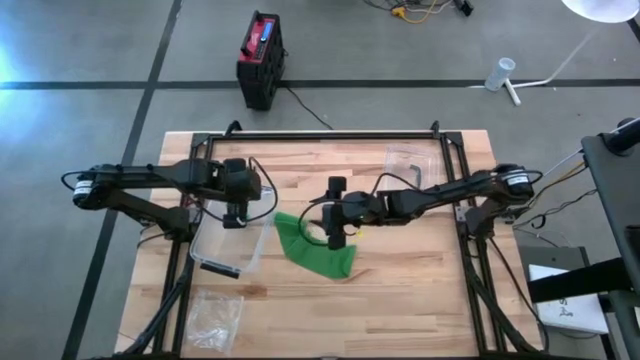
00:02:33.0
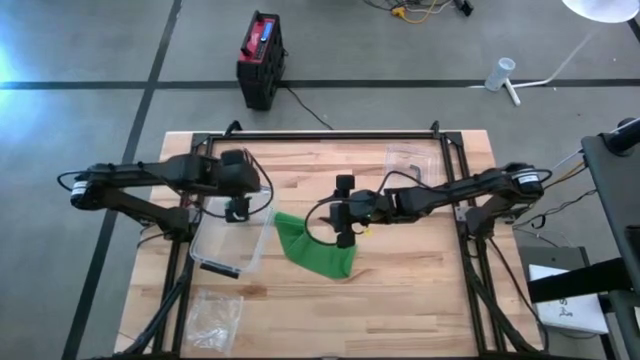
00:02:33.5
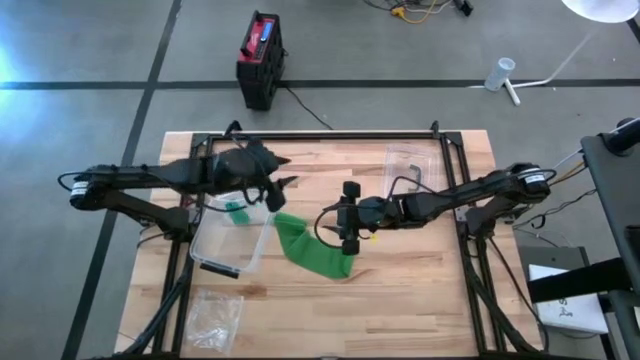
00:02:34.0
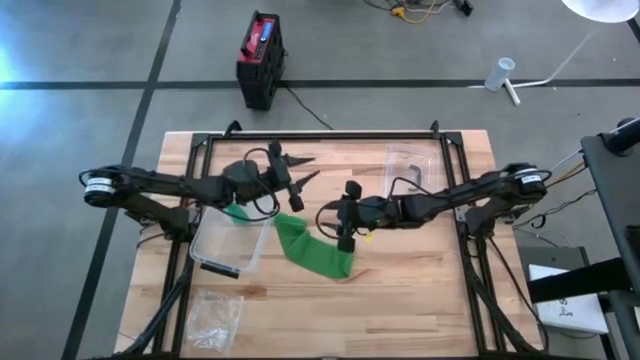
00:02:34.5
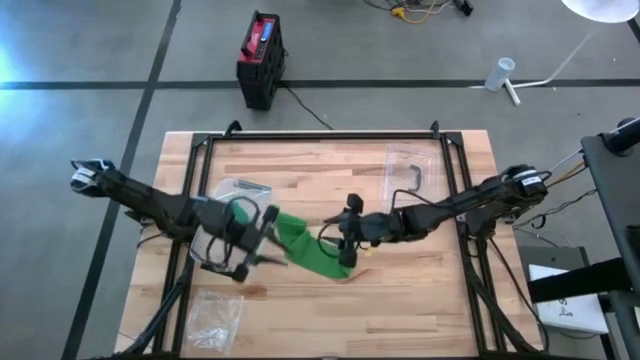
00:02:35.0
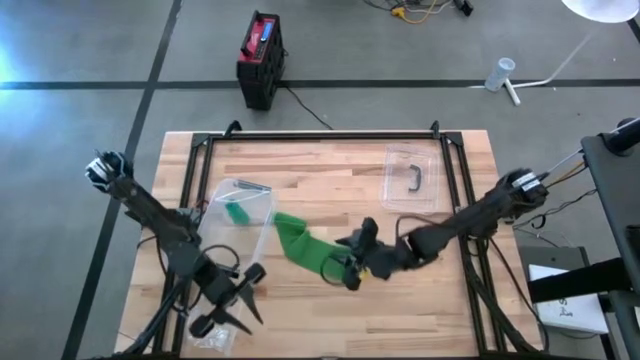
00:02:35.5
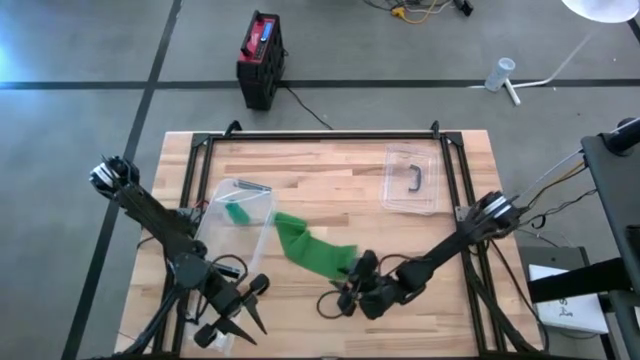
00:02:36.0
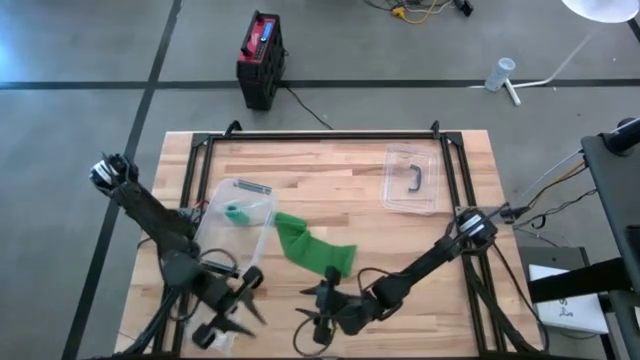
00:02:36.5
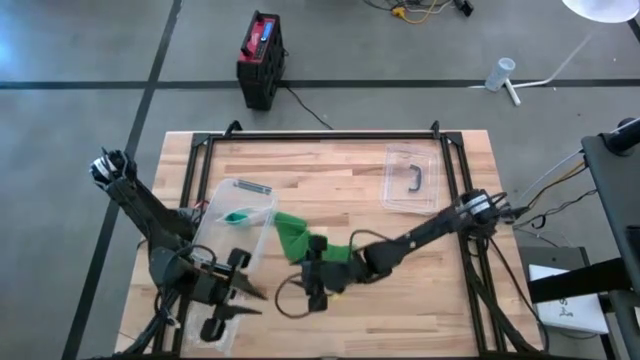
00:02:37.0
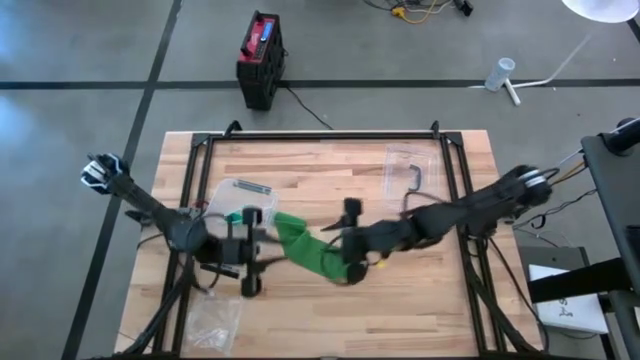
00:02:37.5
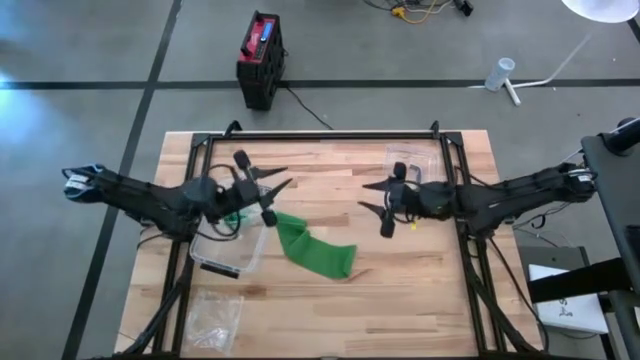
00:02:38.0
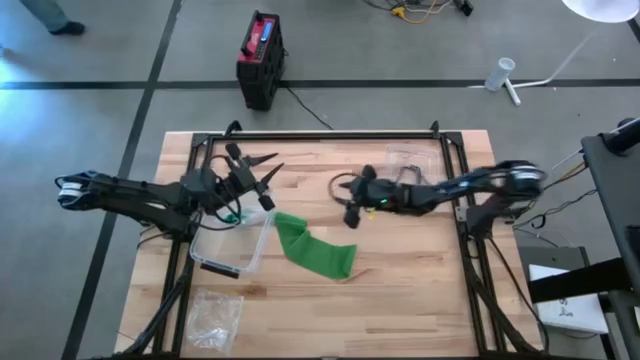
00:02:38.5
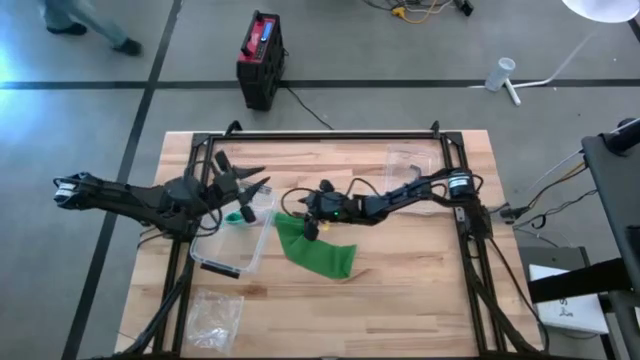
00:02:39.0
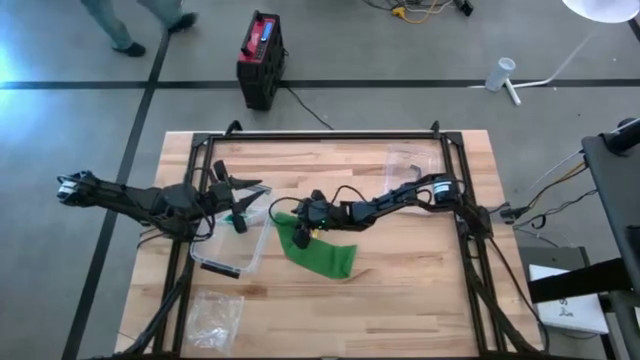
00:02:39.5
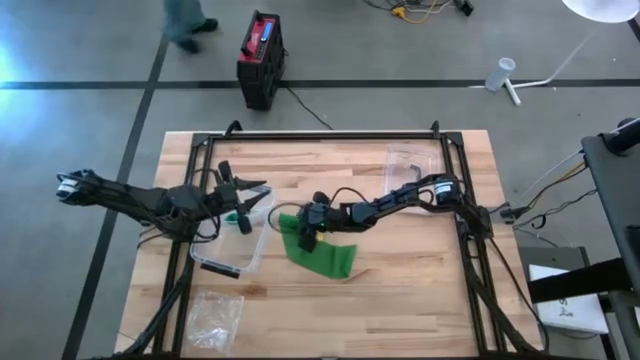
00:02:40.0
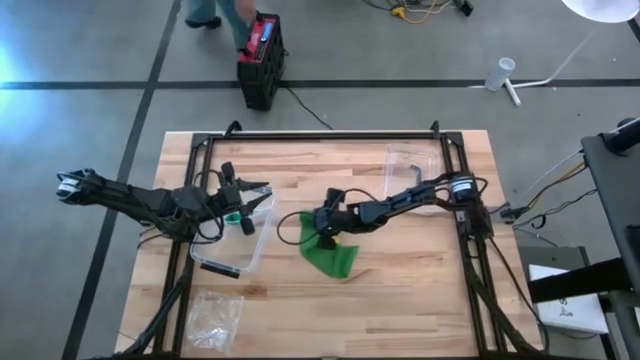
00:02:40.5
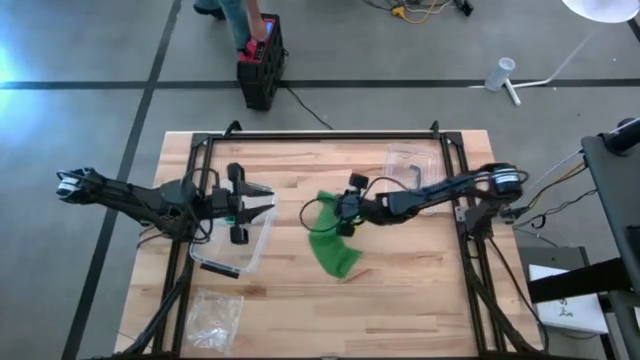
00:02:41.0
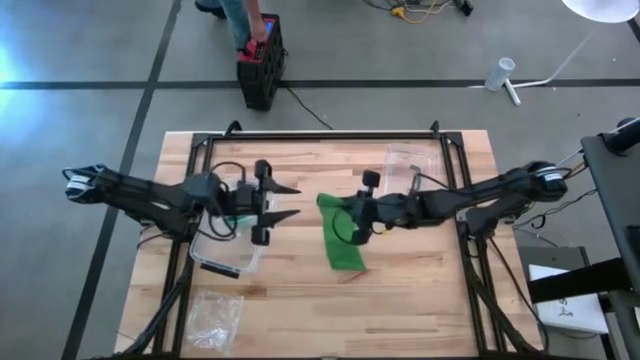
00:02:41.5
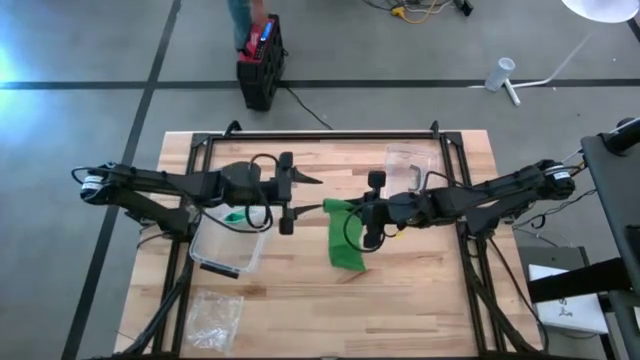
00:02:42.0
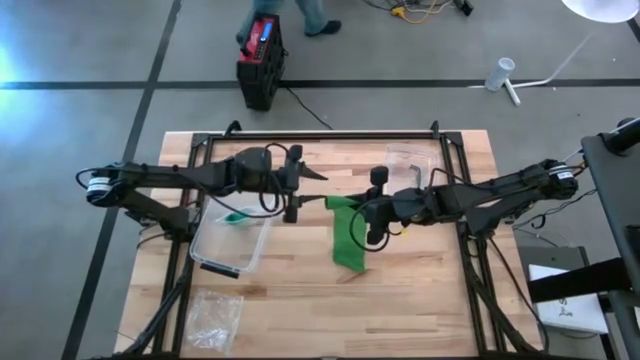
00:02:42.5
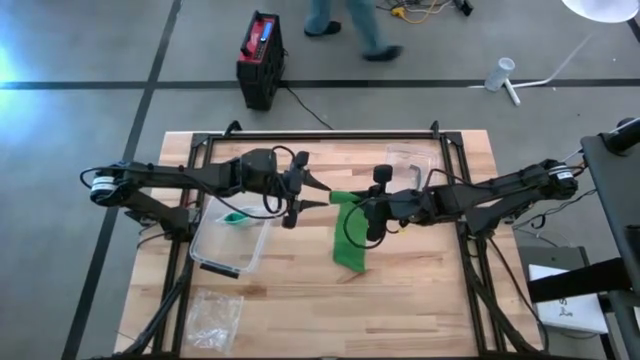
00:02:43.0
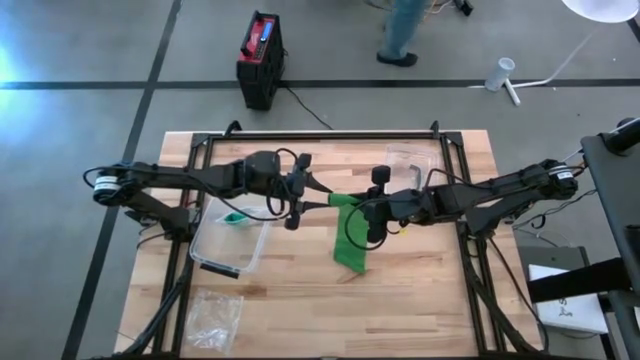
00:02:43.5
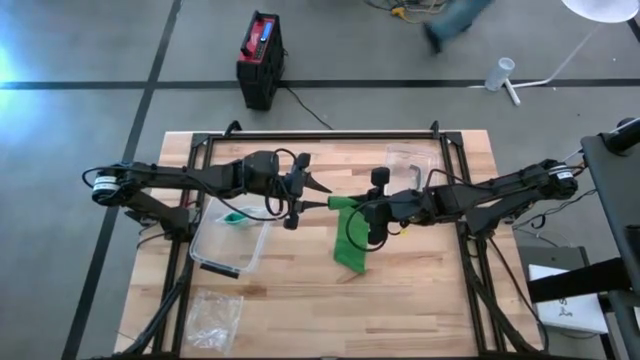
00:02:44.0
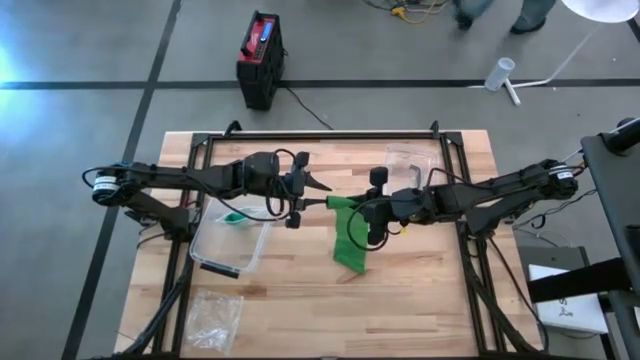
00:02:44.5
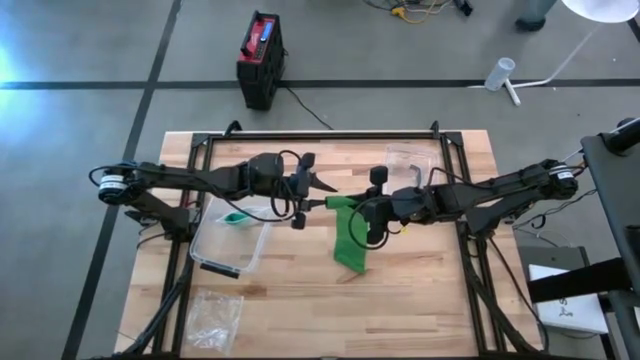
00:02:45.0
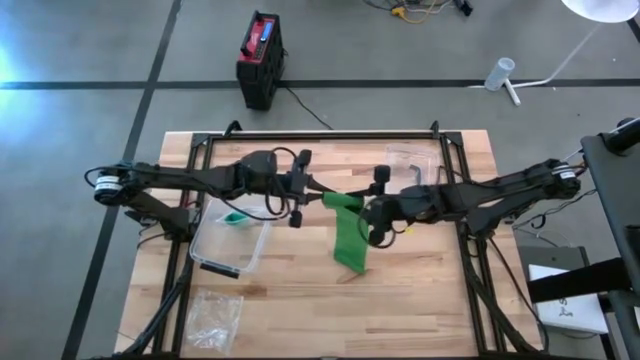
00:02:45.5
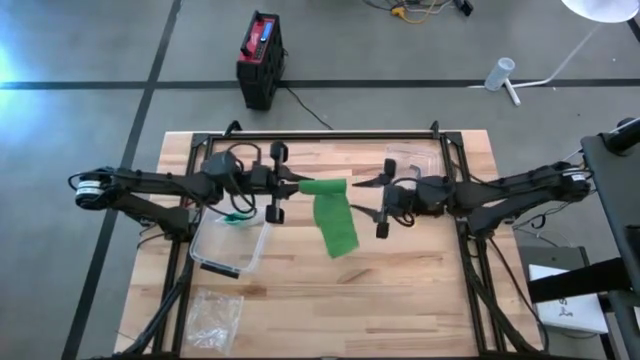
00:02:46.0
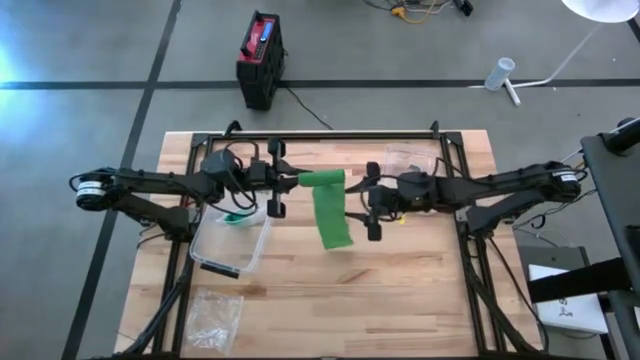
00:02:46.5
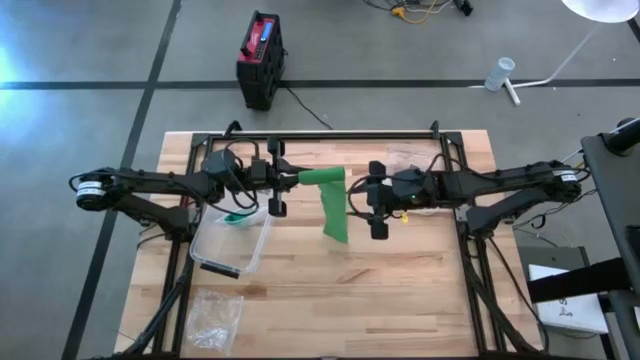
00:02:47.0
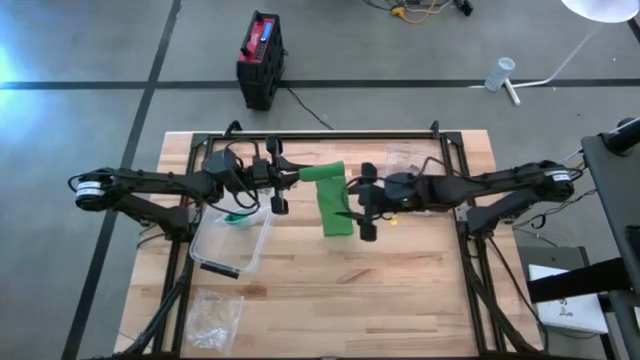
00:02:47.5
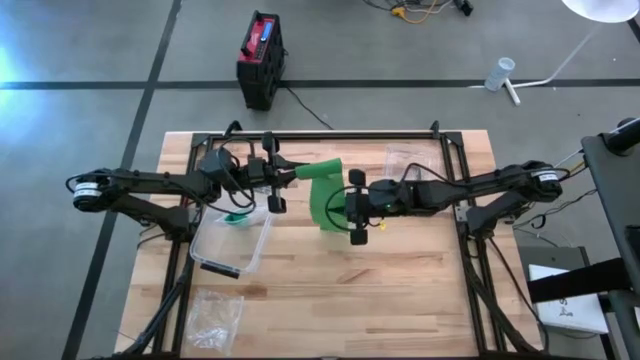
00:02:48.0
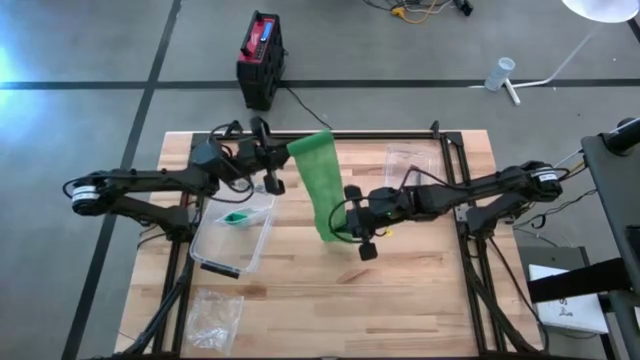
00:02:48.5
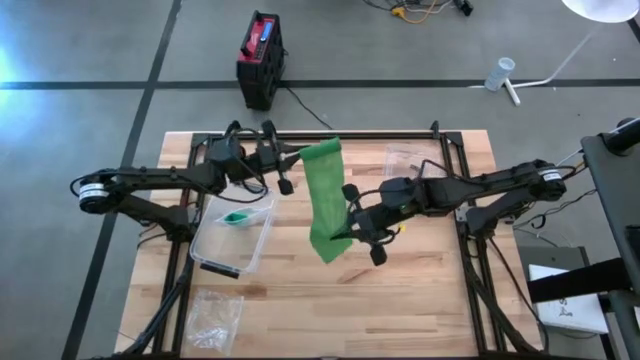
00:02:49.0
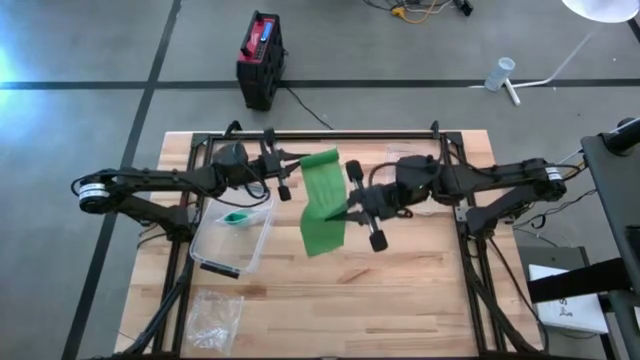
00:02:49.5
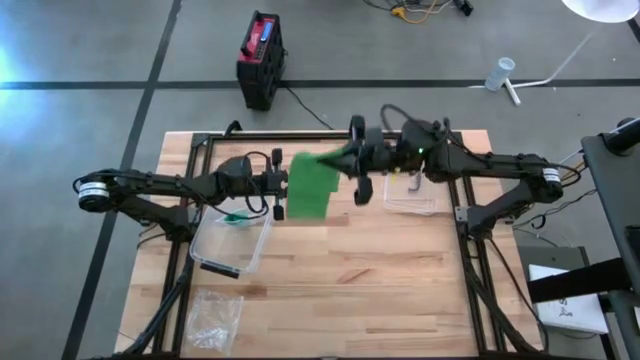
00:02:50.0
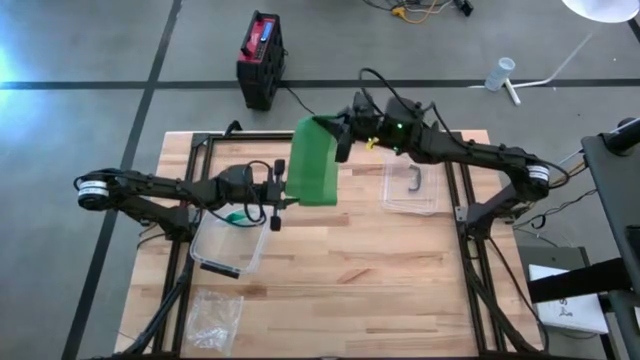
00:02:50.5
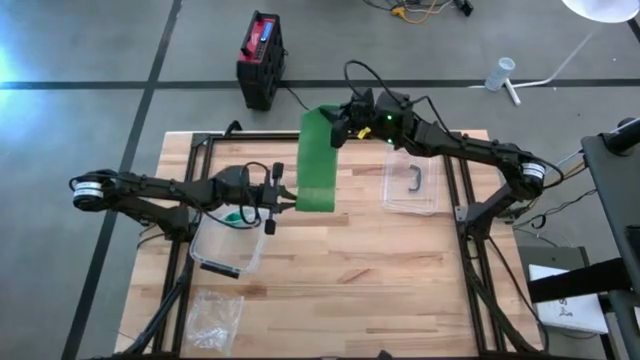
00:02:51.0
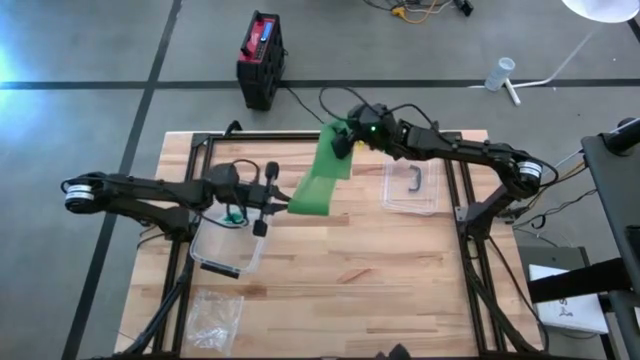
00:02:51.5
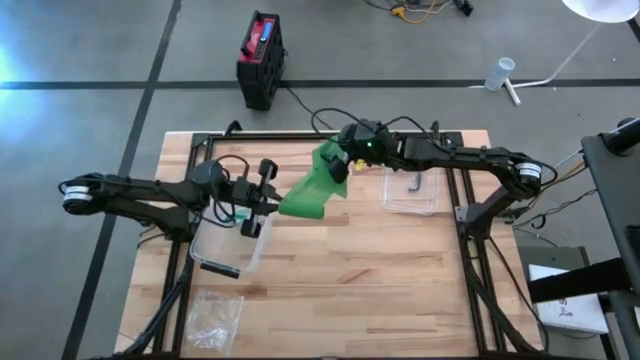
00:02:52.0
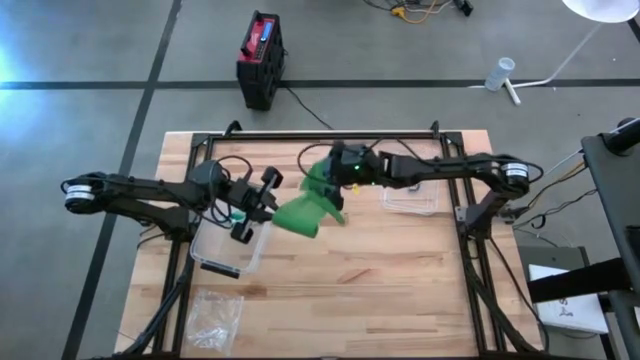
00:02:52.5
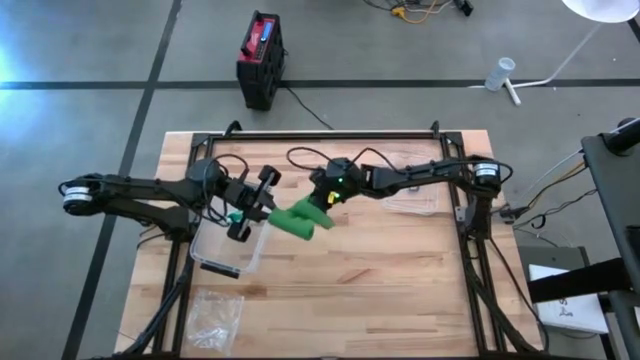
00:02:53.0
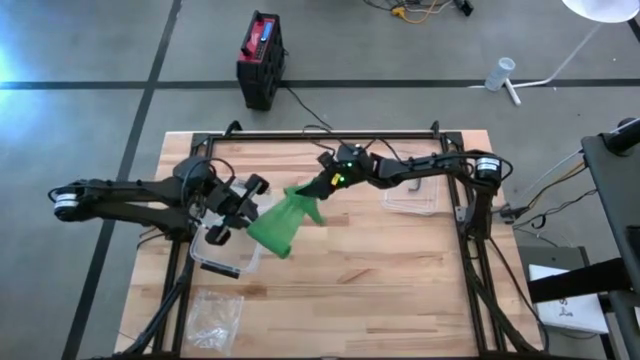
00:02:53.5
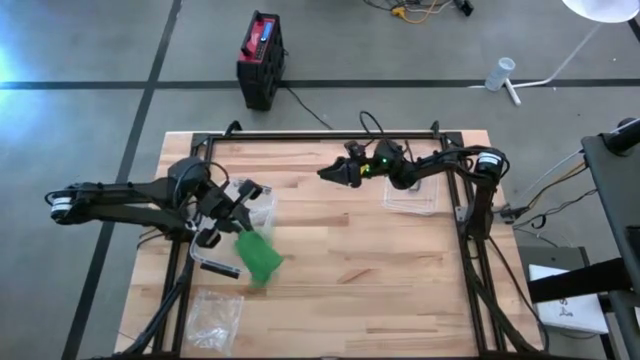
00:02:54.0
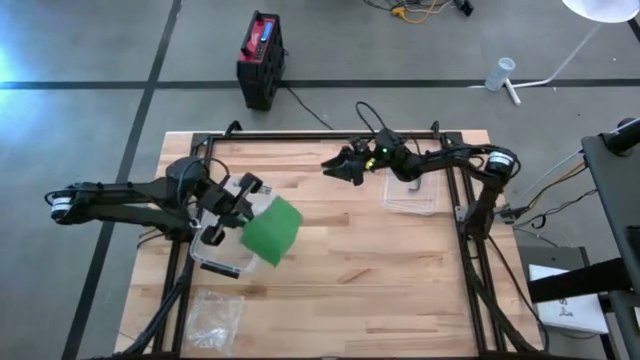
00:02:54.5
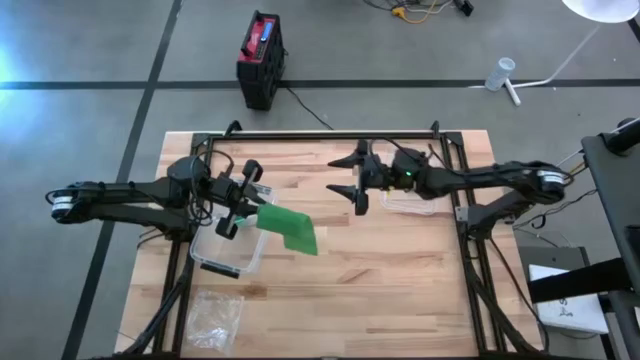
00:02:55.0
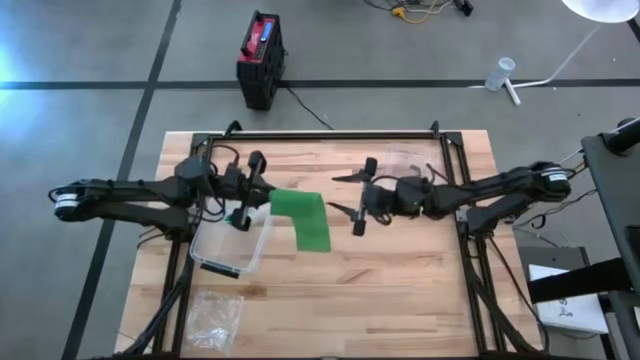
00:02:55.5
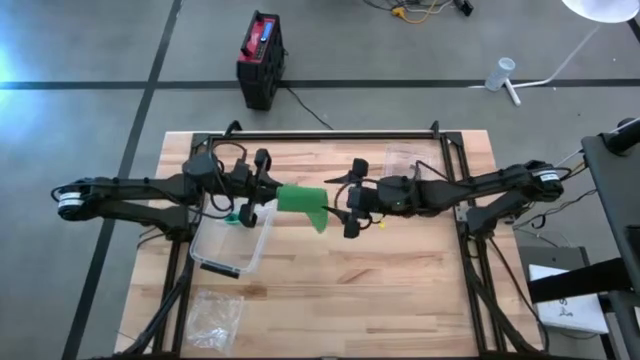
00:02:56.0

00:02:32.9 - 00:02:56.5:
Task: Roll bandage
Roll the dark green bandage
